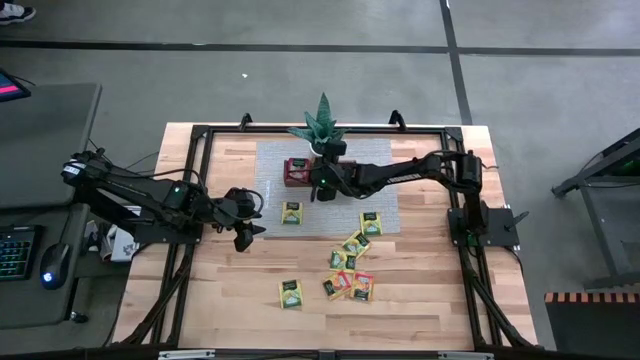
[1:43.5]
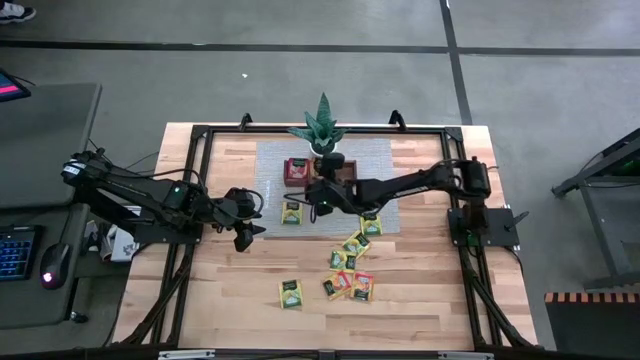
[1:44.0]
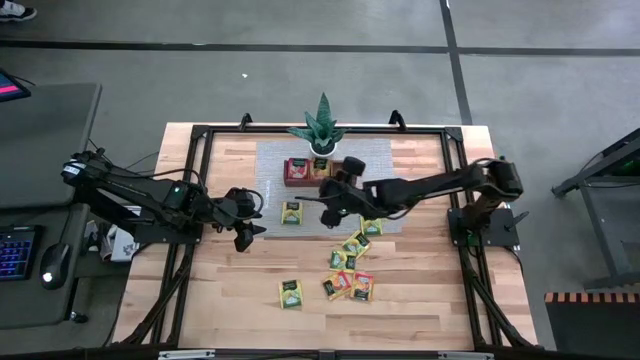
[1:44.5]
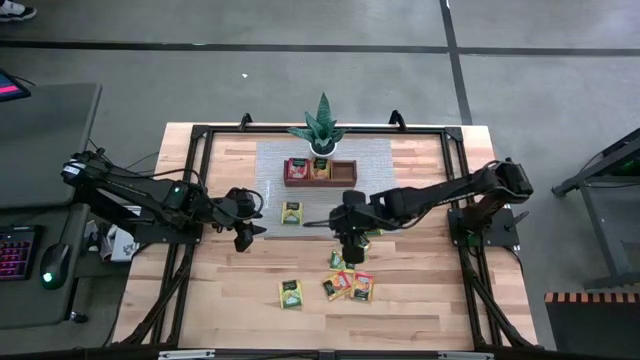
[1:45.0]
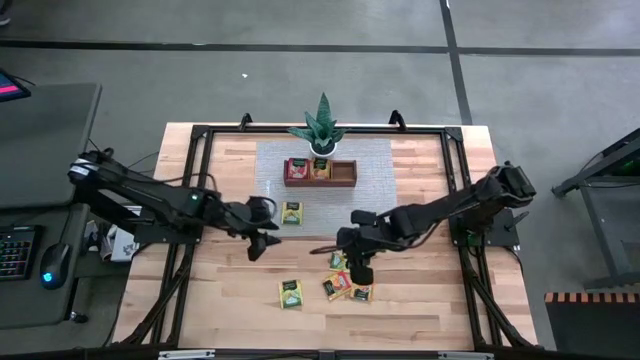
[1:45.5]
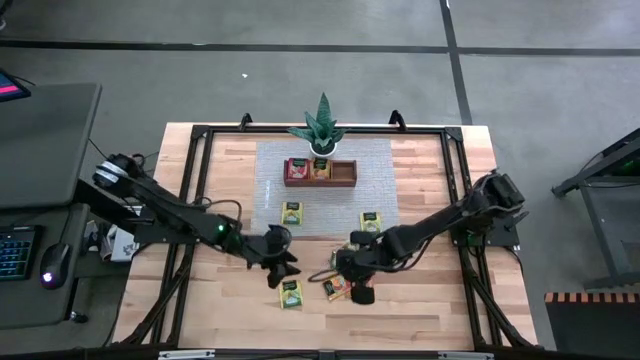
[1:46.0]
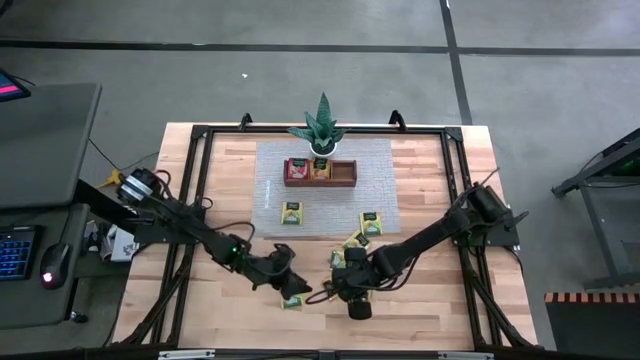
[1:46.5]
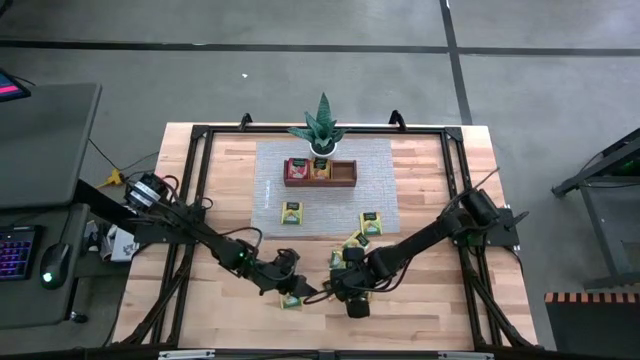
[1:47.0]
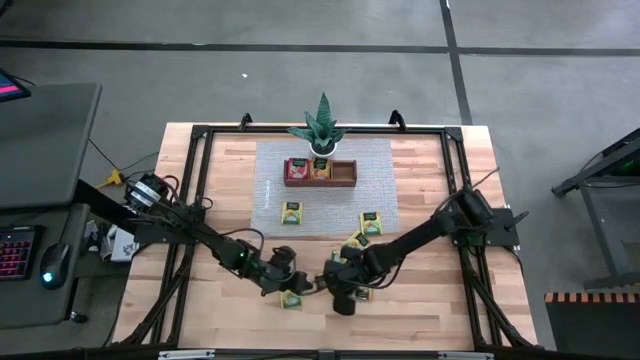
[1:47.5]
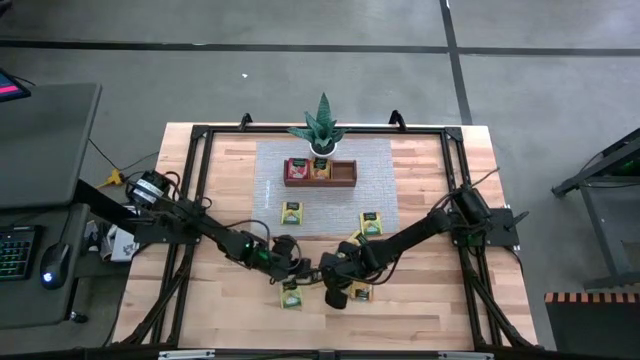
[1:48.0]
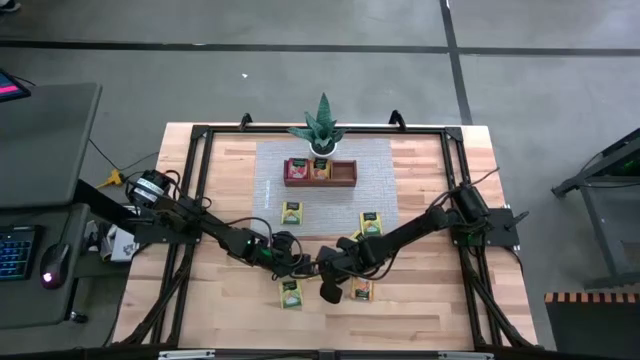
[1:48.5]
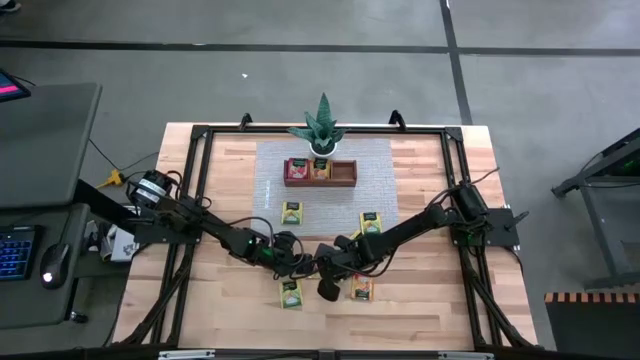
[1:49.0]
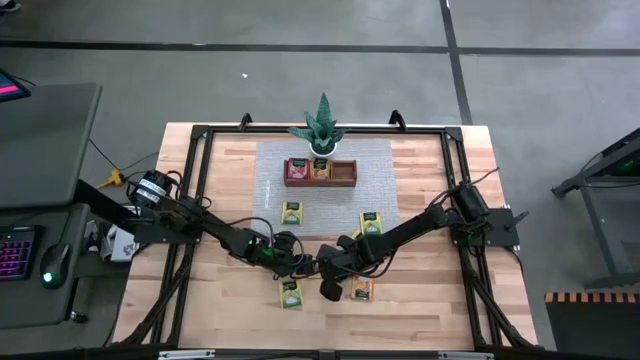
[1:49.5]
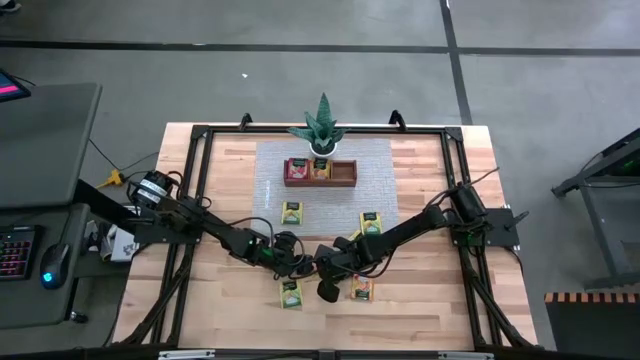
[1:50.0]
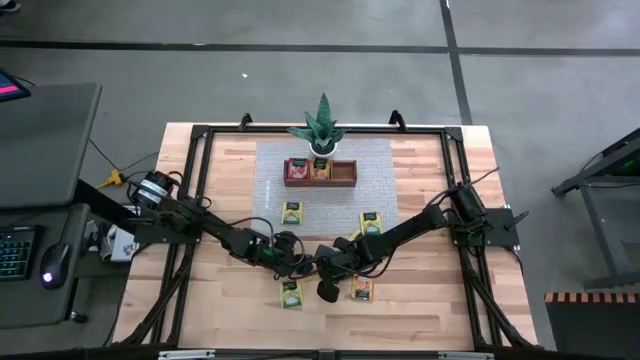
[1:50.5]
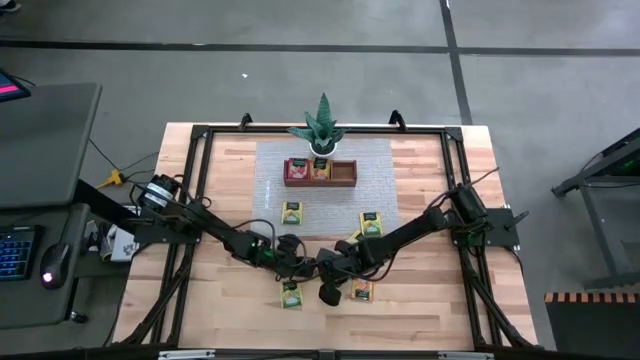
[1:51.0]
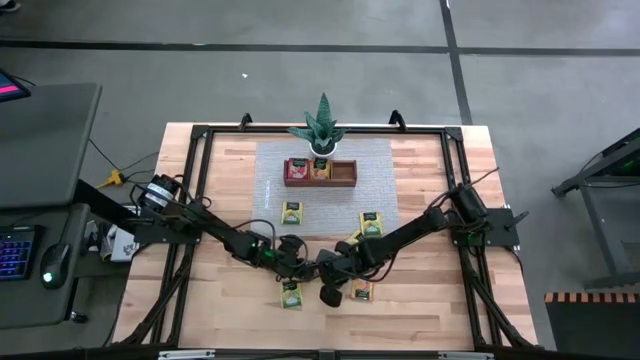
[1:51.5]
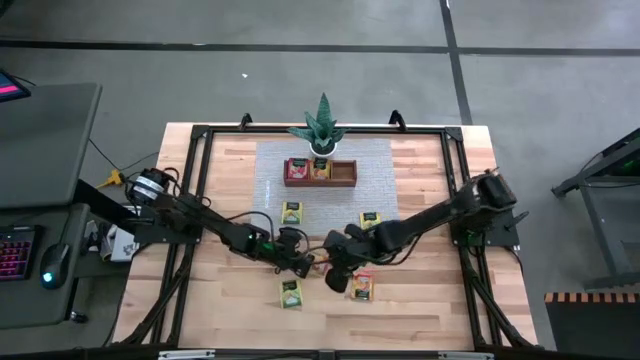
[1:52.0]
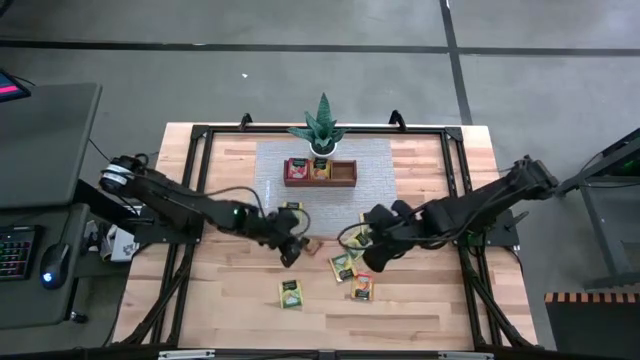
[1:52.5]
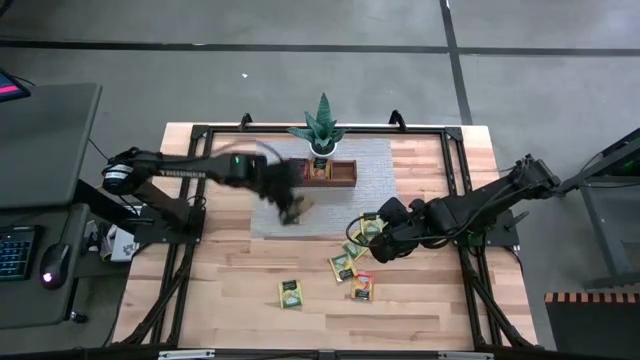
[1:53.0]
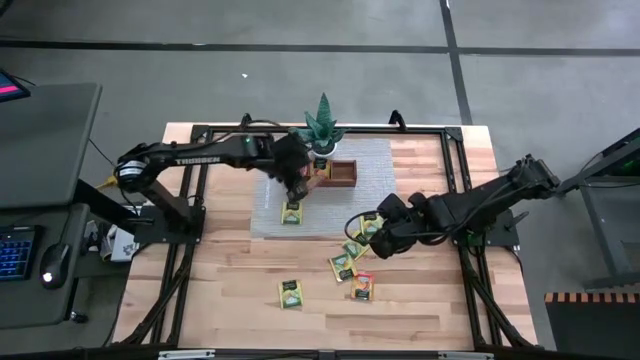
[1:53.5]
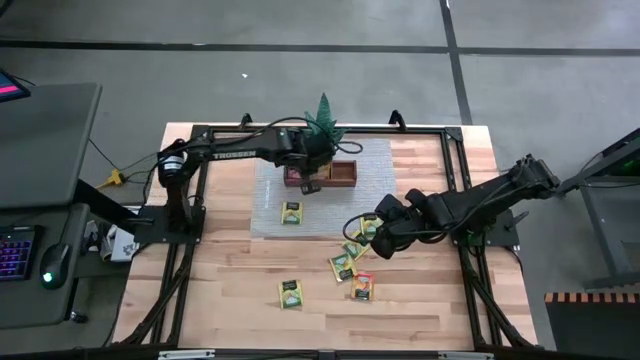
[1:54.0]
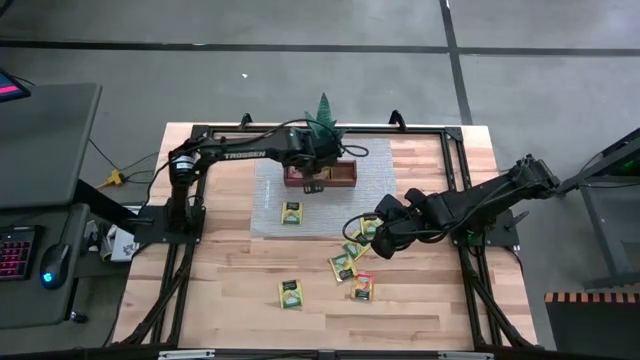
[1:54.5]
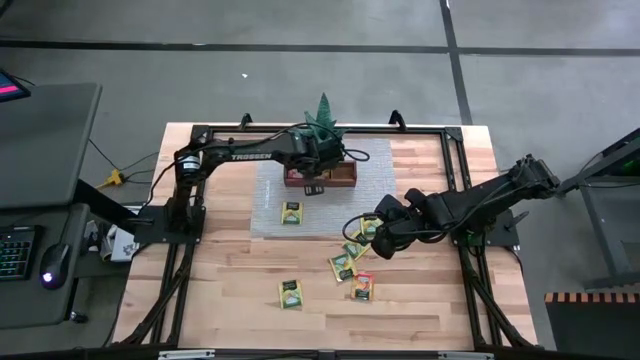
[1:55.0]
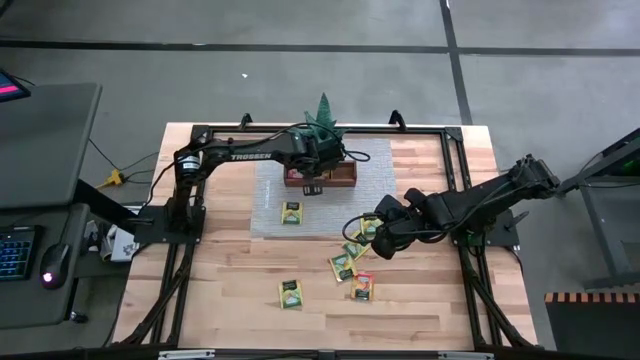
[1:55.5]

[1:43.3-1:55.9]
Task: Pick & Place Tea
Put the orange tea bag into the middle section of the wooden organizer

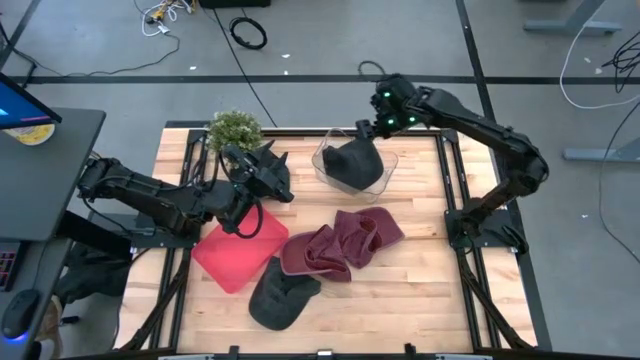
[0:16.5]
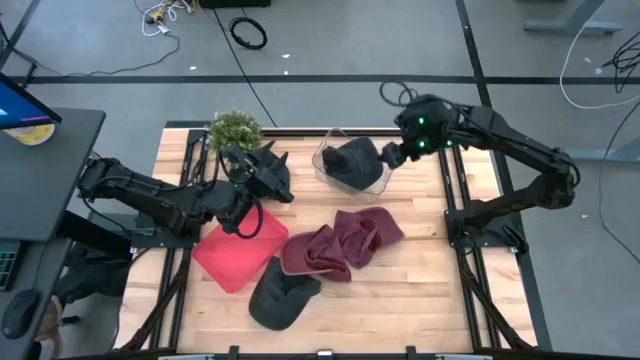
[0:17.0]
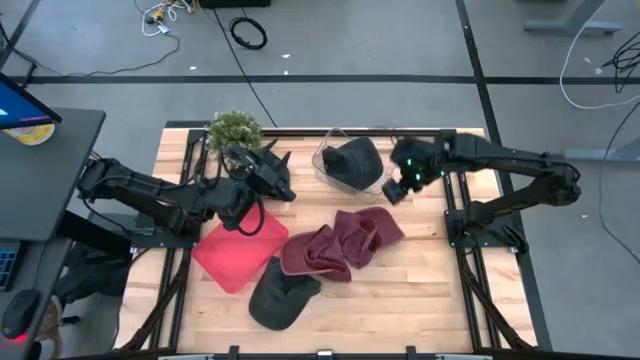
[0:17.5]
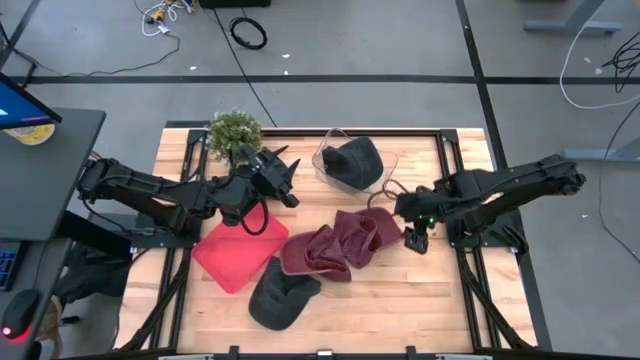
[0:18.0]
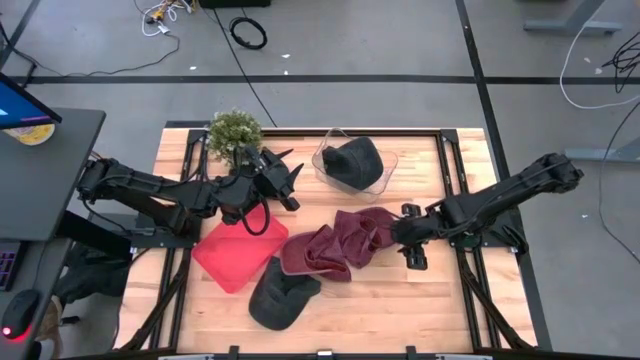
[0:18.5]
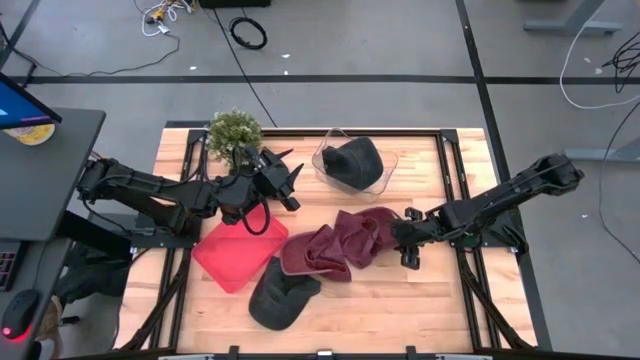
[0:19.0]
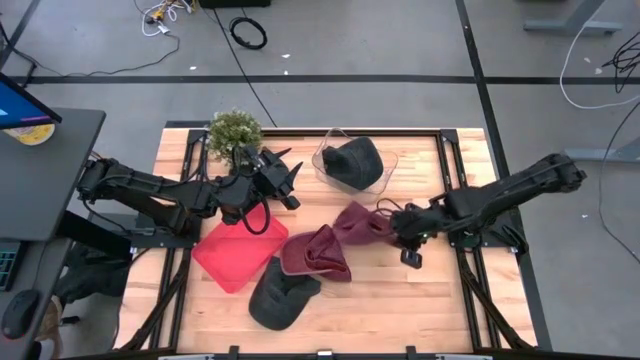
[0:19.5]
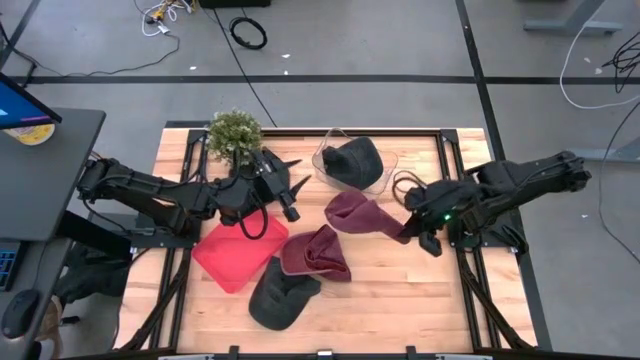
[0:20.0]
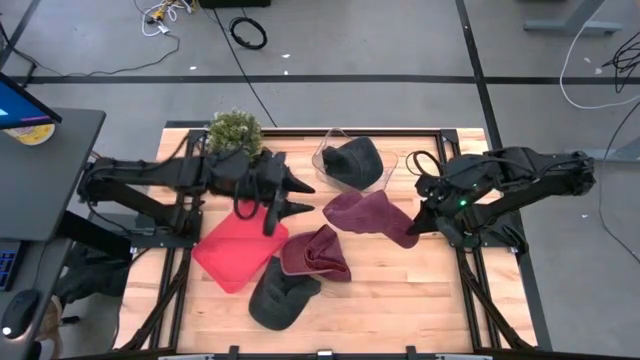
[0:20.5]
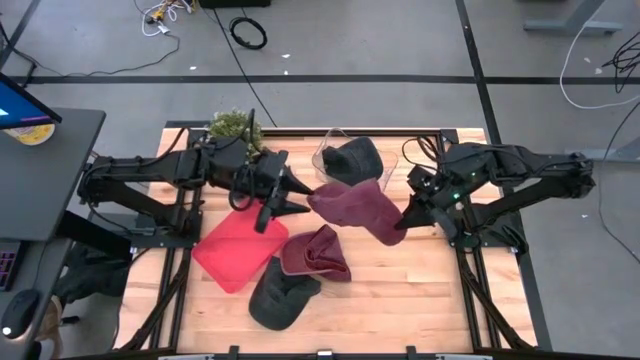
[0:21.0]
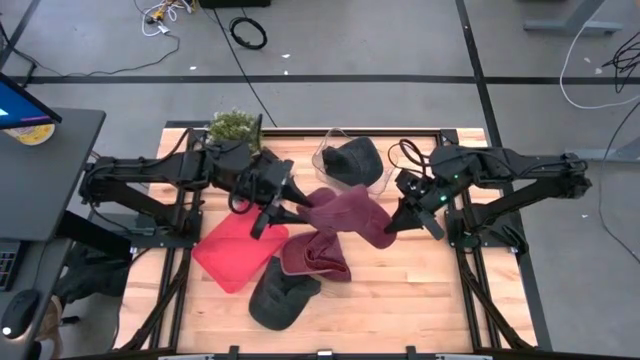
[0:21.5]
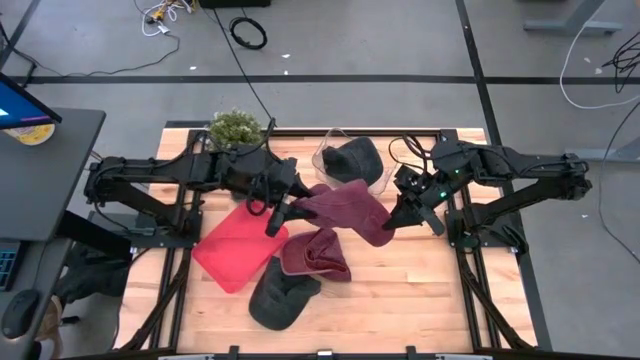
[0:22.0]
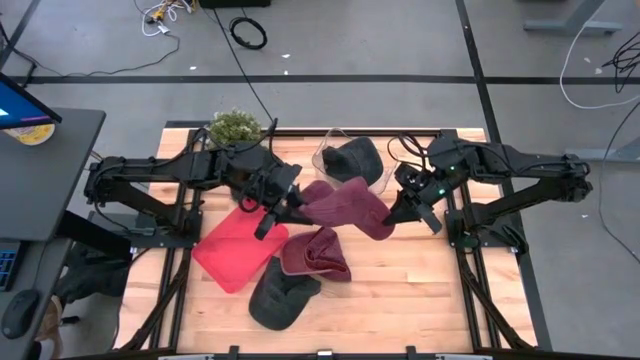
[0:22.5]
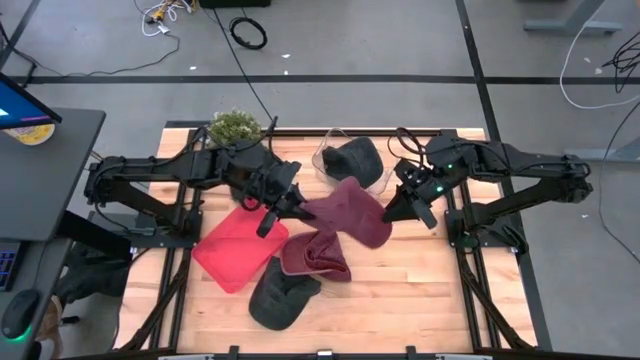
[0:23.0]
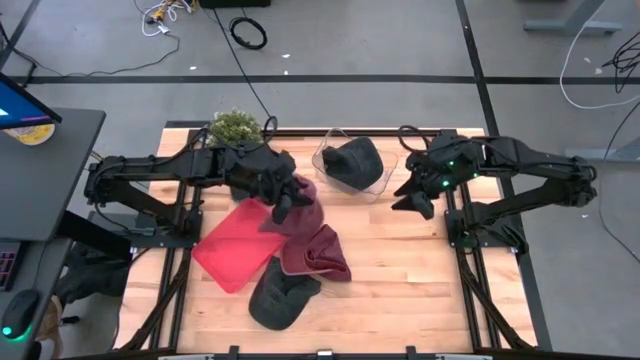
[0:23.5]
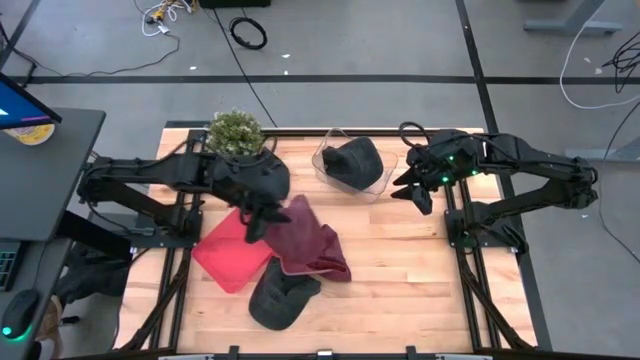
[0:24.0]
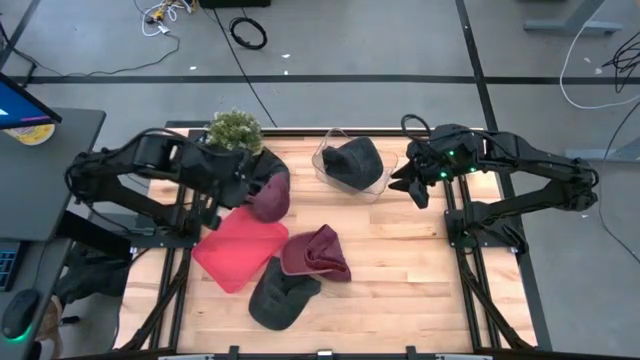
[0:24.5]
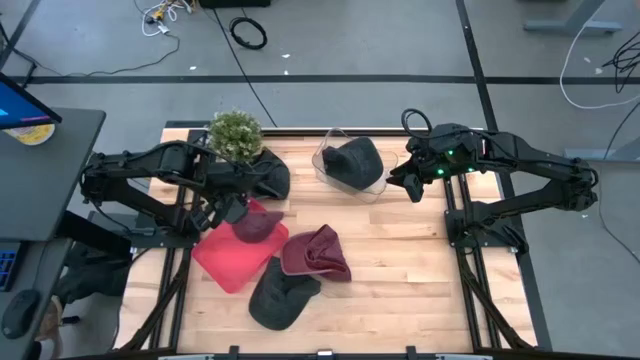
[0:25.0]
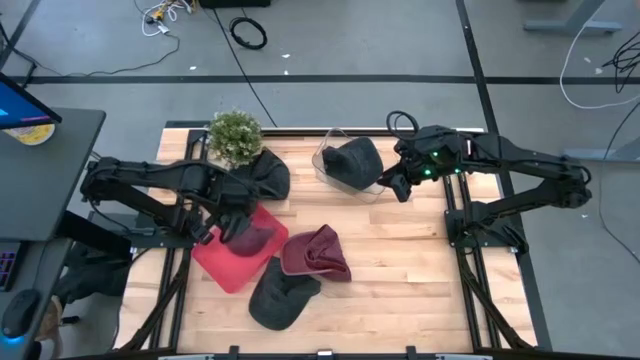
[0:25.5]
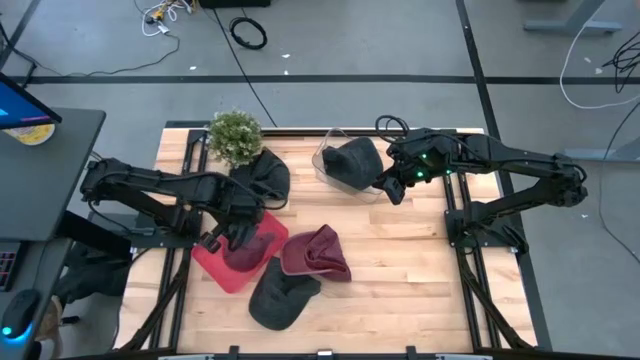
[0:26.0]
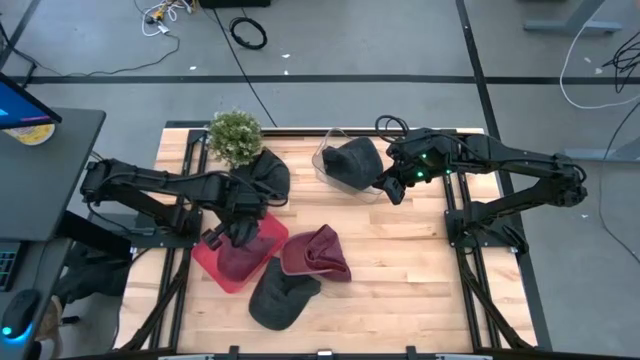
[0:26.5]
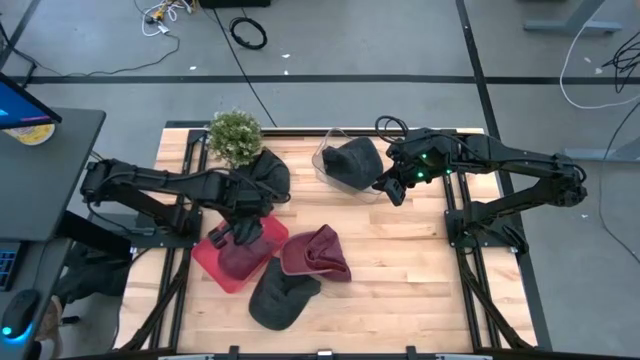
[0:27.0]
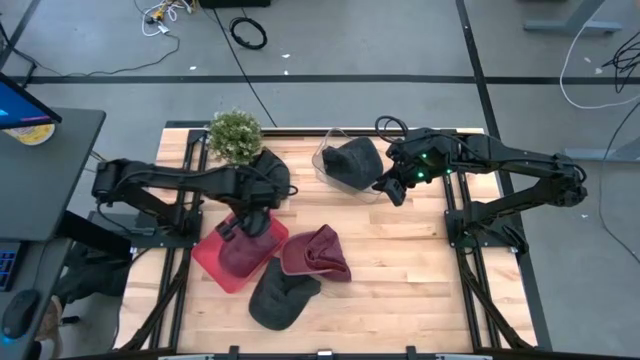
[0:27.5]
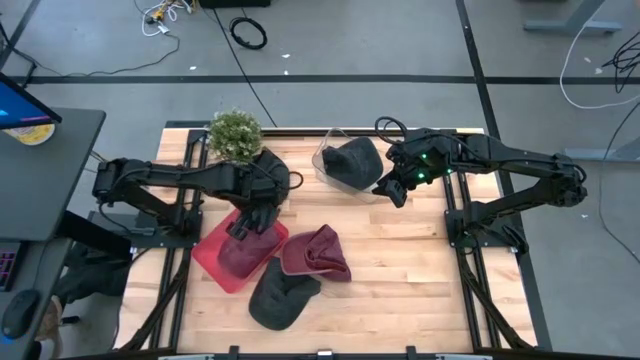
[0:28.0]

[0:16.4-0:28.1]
Task: Pick & Place hat
Put the right red cap into the red bin
